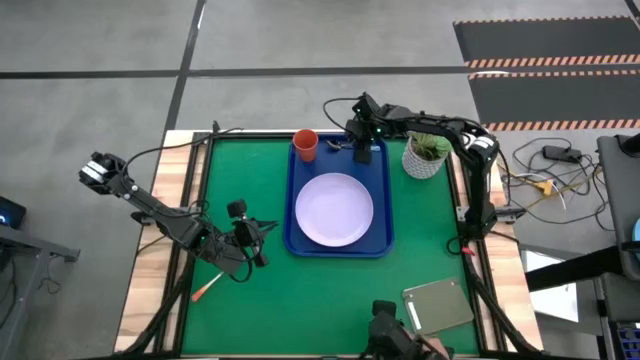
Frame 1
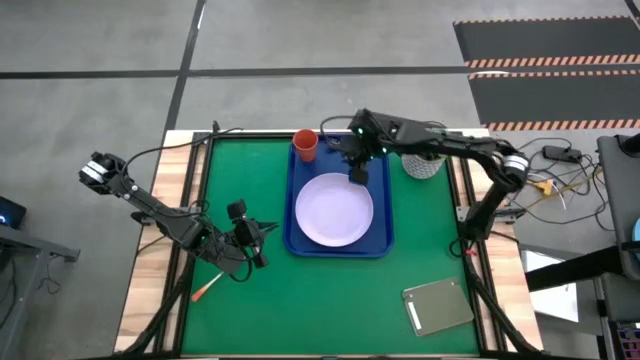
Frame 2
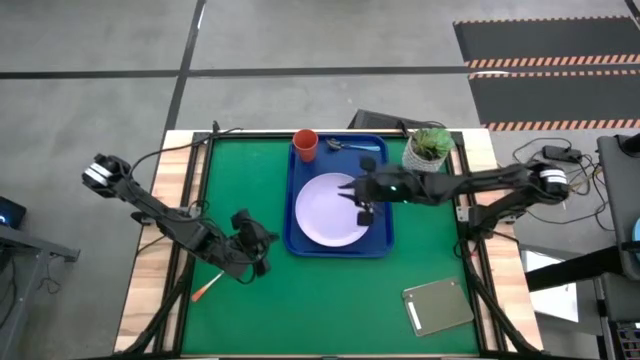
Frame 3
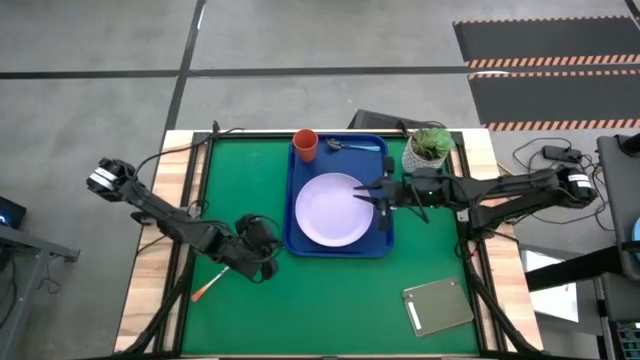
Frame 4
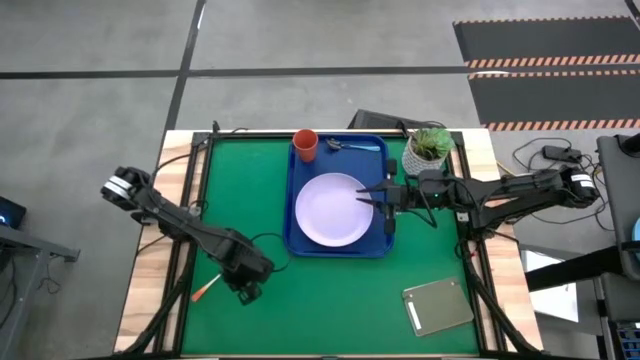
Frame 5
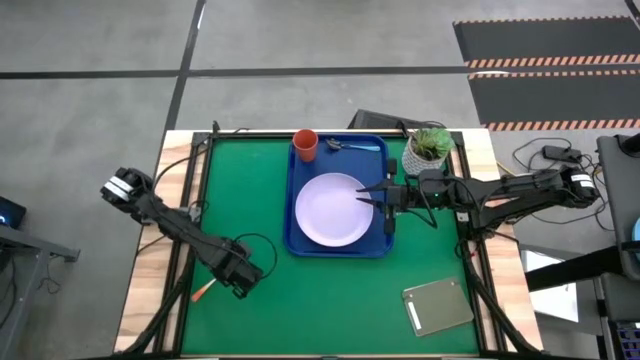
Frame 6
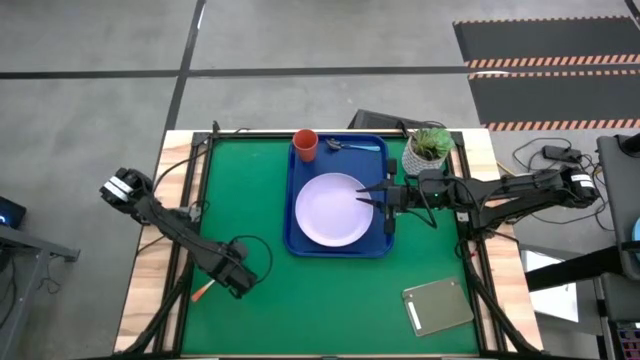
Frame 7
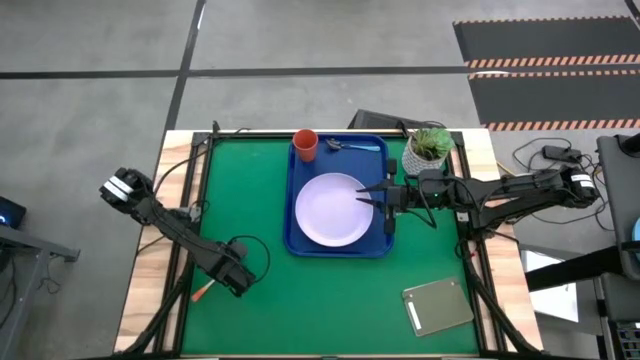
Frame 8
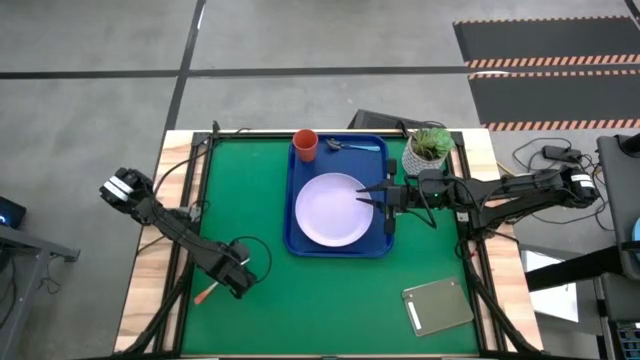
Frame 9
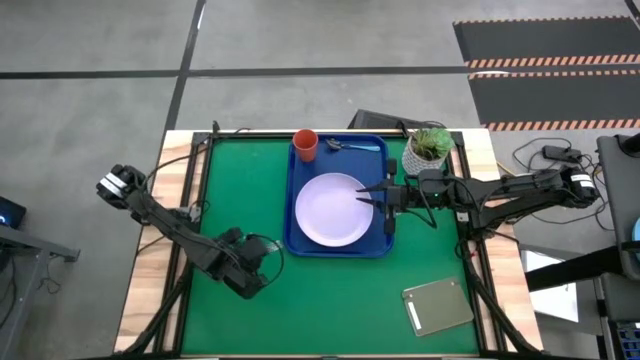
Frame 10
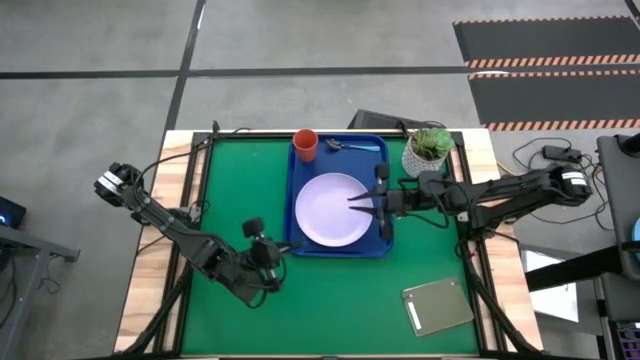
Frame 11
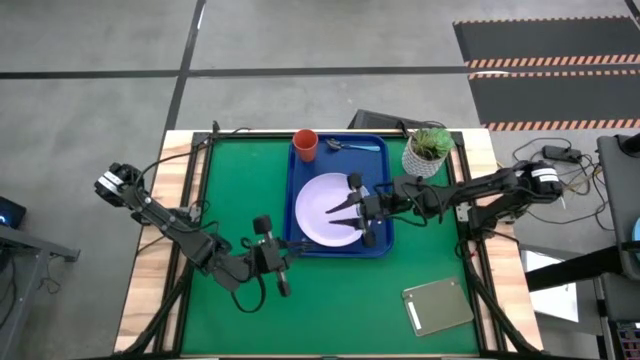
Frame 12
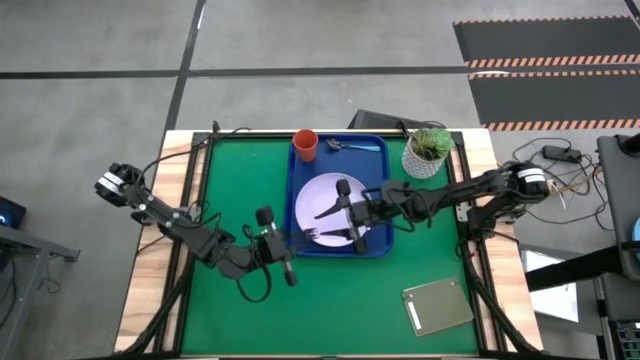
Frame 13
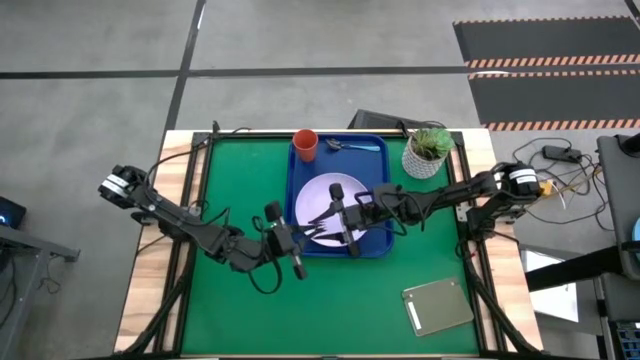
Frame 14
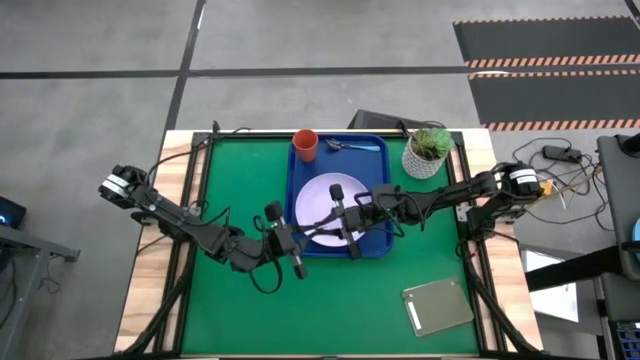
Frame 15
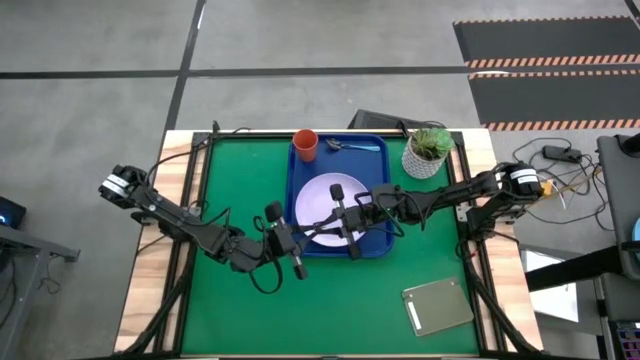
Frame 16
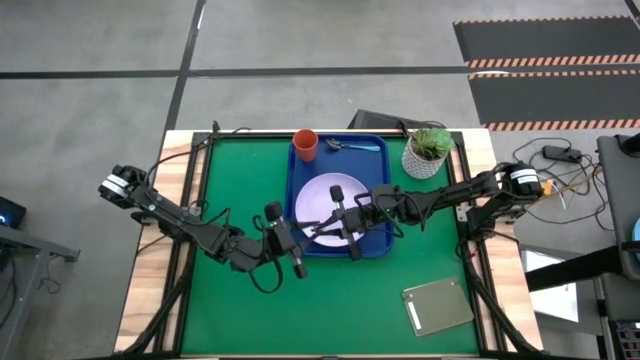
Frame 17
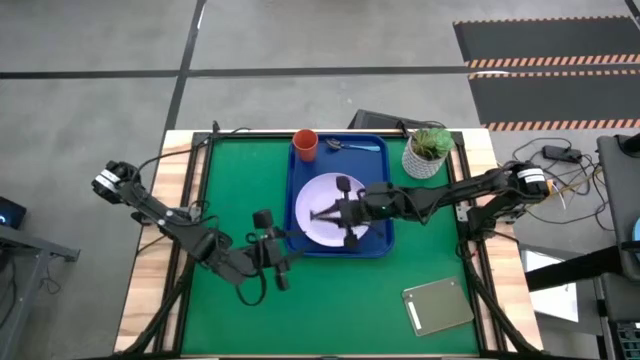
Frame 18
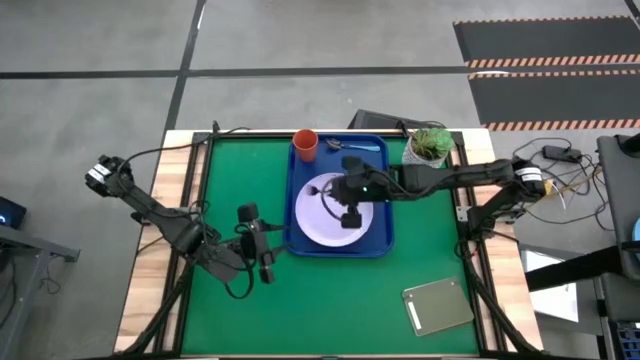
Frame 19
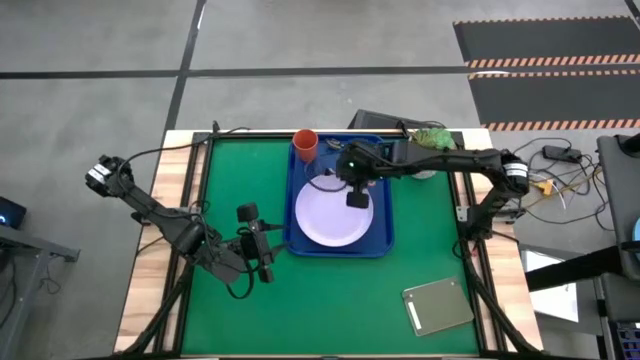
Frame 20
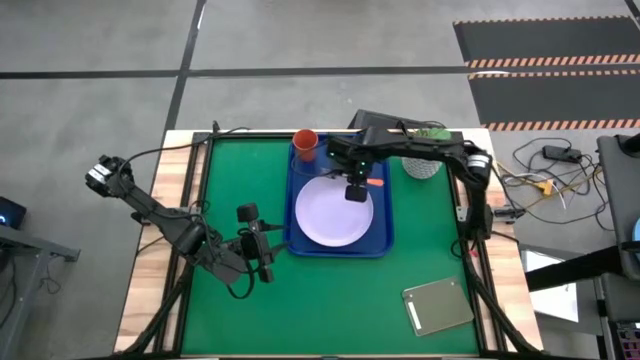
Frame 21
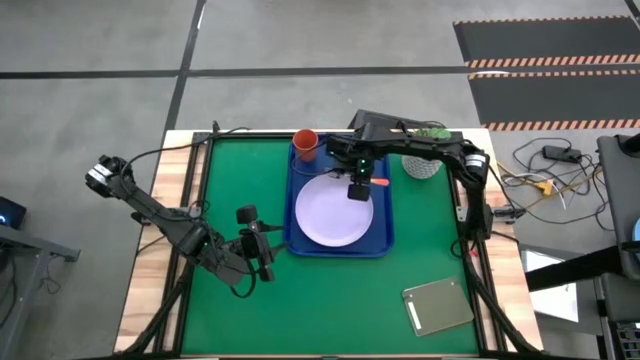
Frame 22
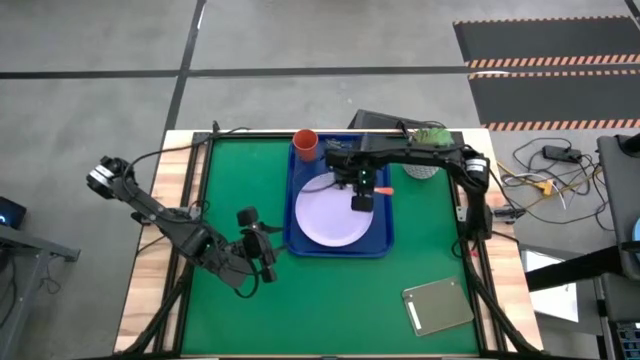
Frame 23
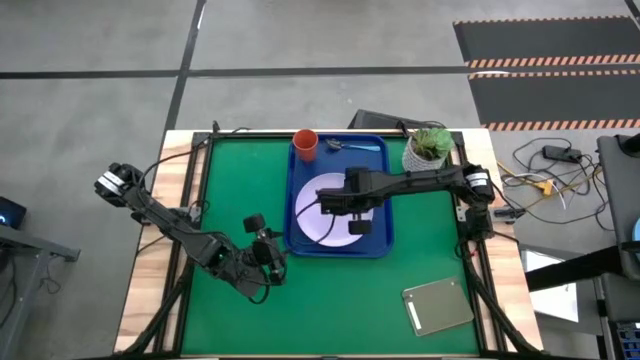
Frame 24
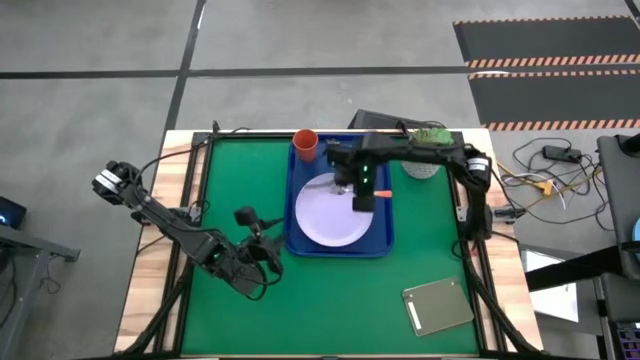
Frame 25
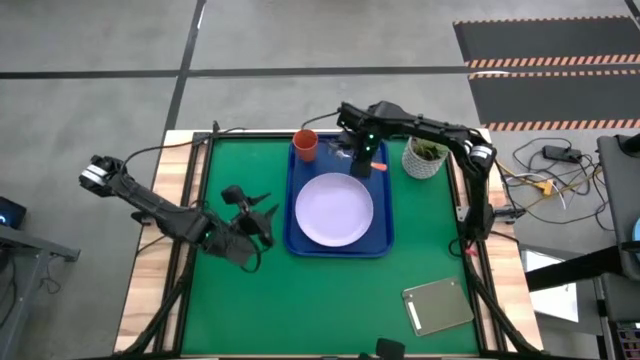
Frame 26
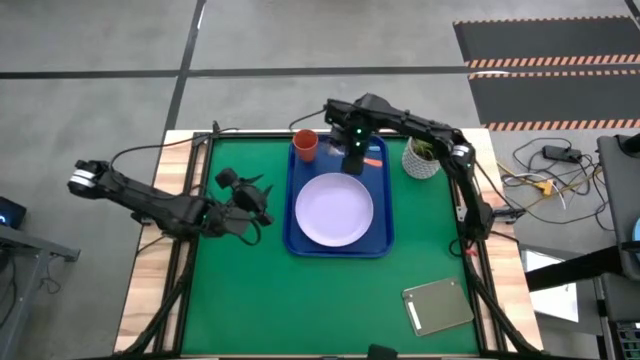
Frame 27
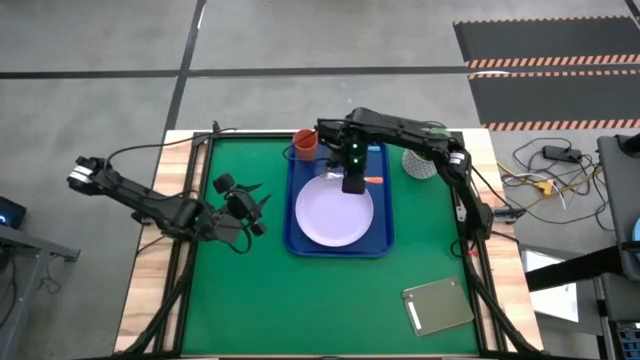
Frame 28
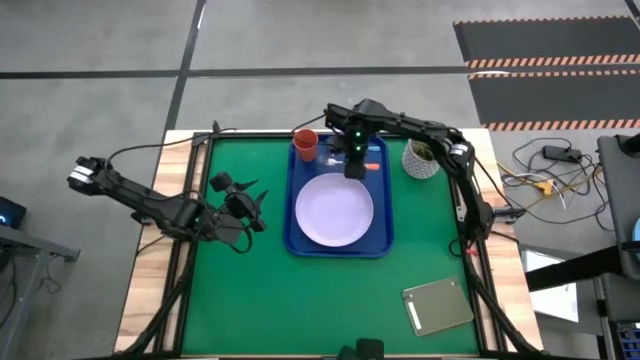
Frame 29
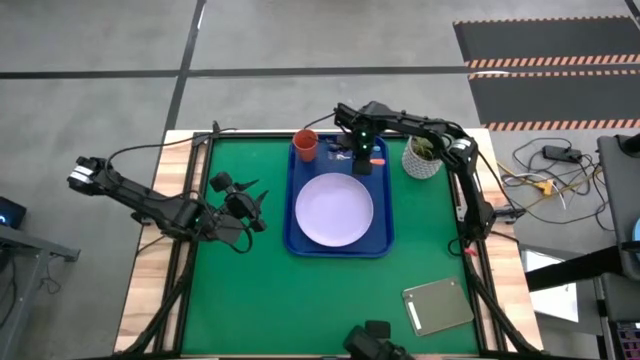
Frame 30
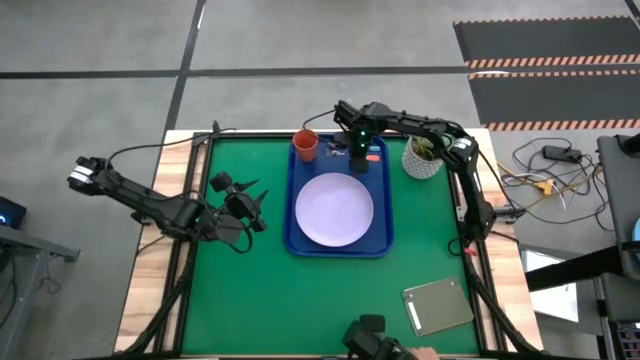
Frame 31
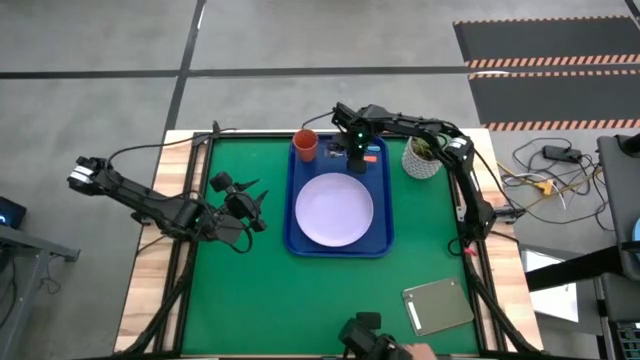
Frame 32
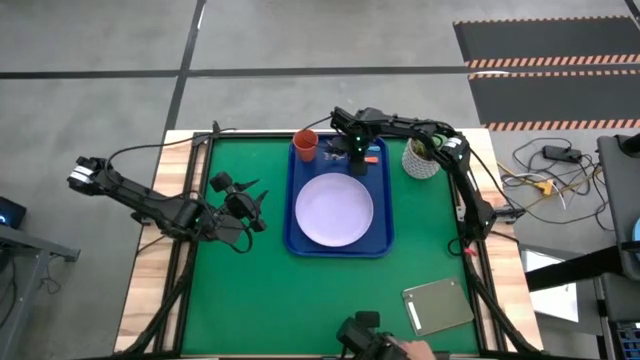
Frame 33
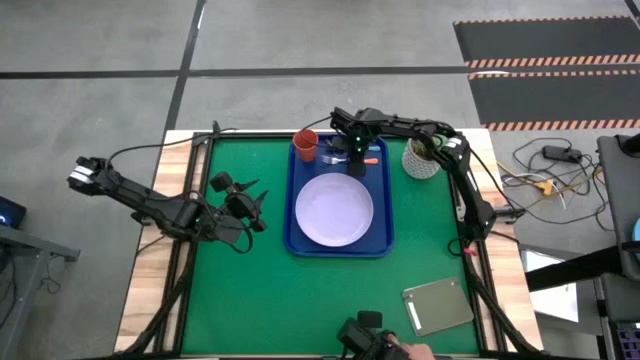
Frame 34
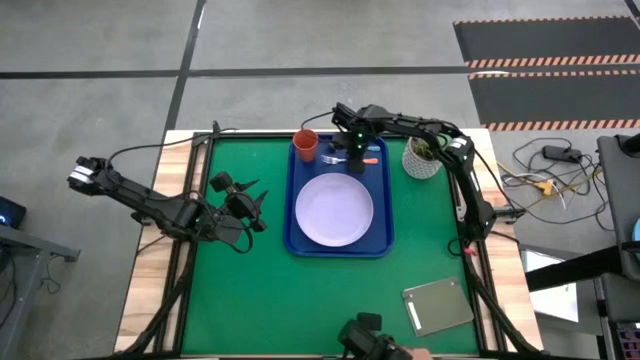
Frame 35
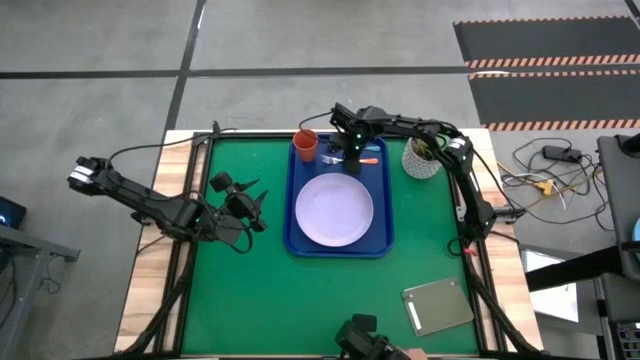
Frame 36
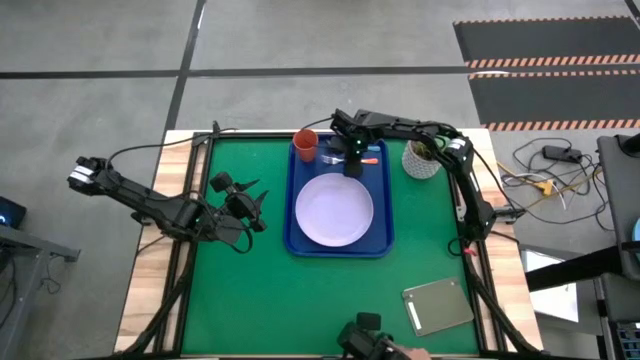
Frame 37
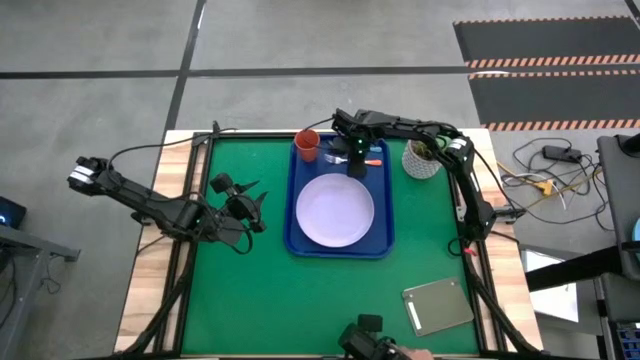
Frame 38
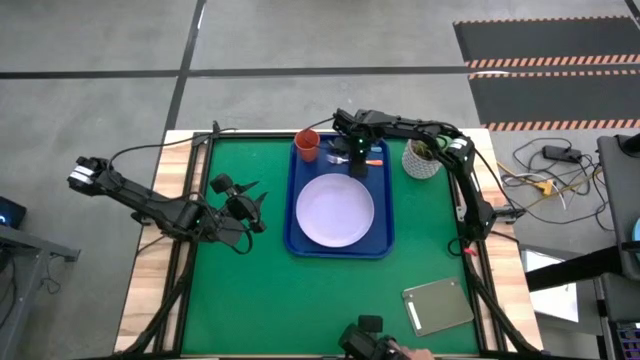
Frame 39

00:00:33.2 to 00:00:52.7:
Task: Pick and place plate/cup/fork/spoon on tray
Put the orange fork on the blue tray to the left of the blue spoon

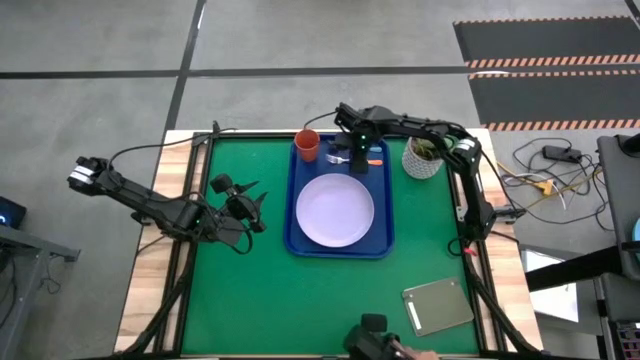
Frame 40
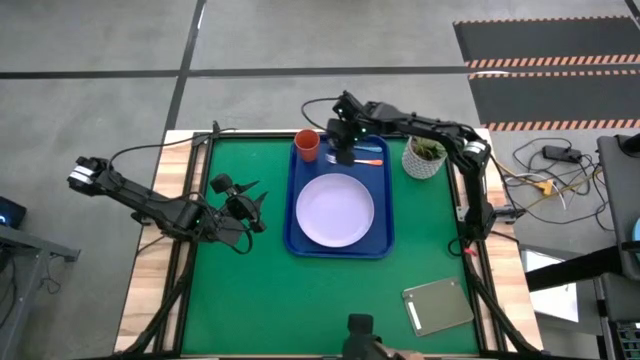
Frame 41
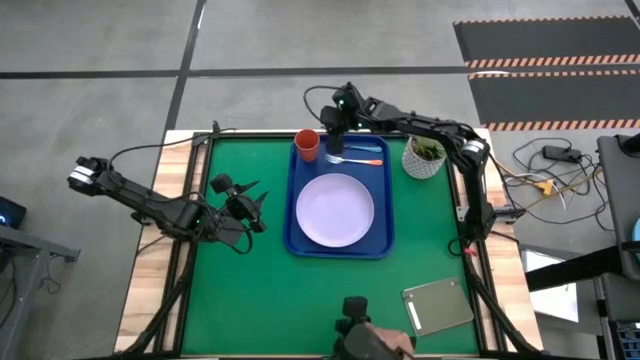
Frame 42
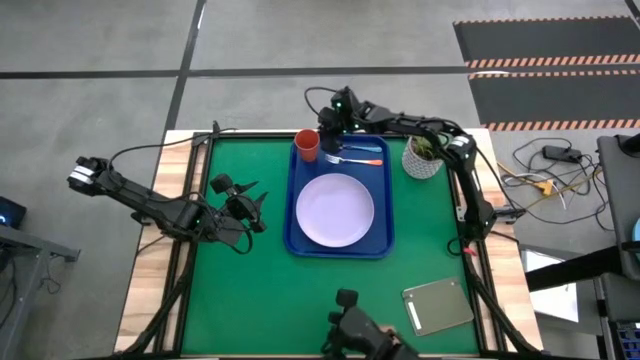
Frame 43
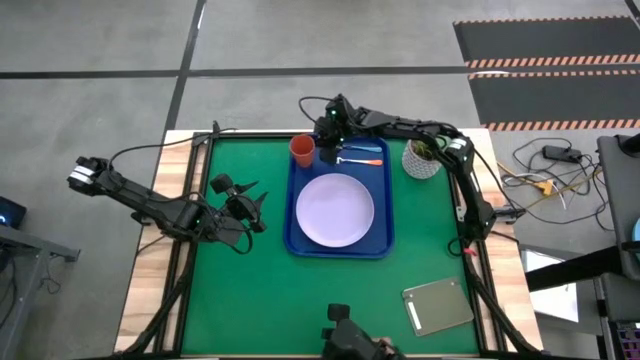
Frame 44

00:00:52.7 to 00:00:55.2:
Adjust the orange cup

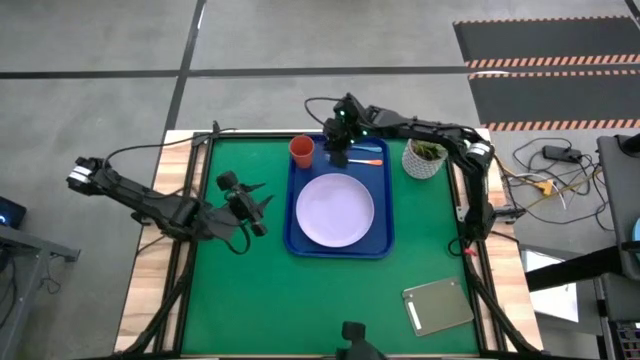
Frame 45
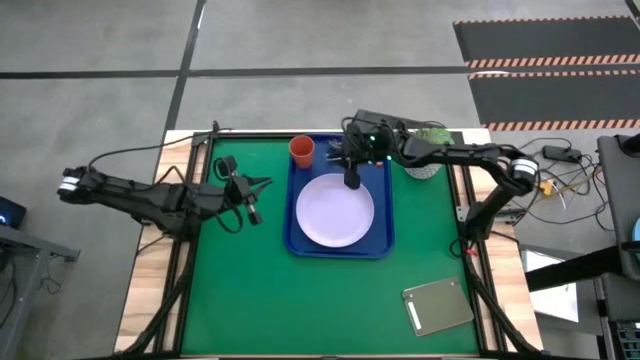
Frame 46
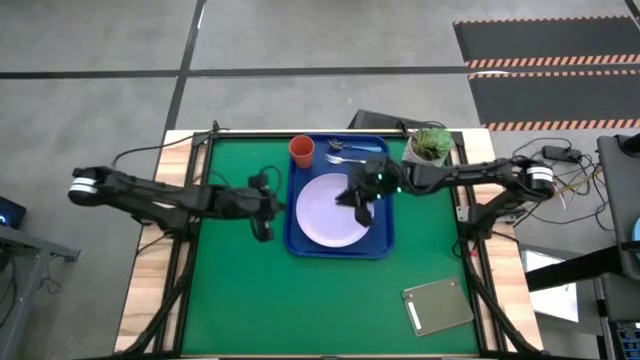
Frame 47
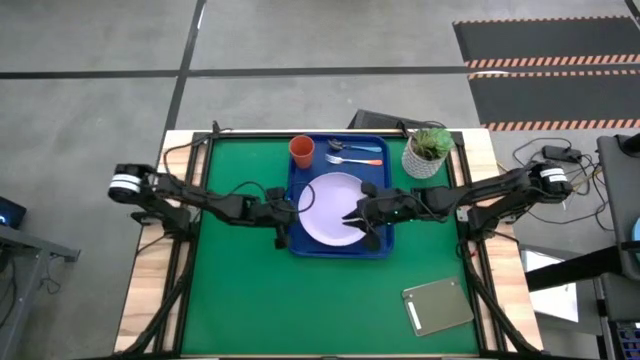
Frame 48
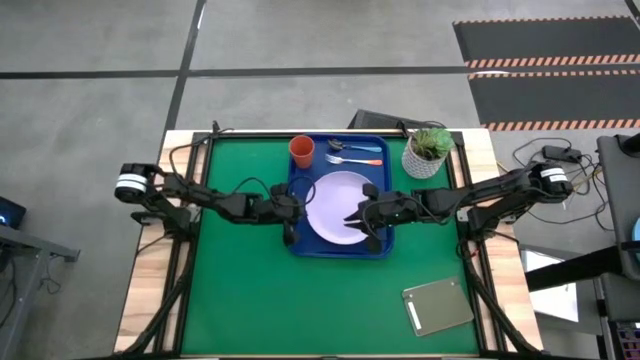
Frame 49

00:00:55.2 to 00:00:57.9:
Adjust the white plate
